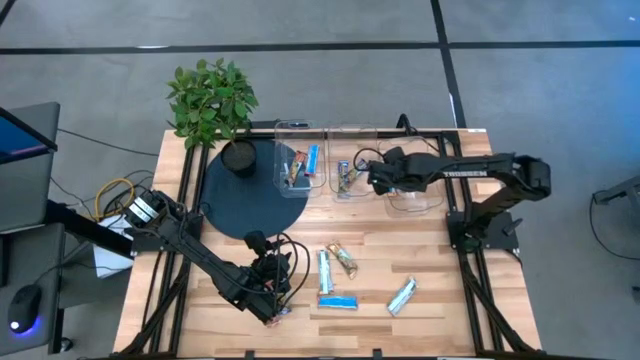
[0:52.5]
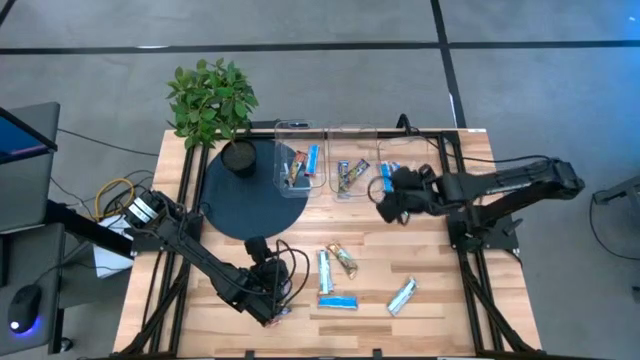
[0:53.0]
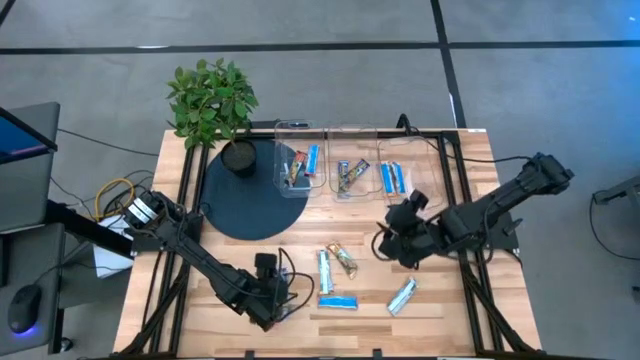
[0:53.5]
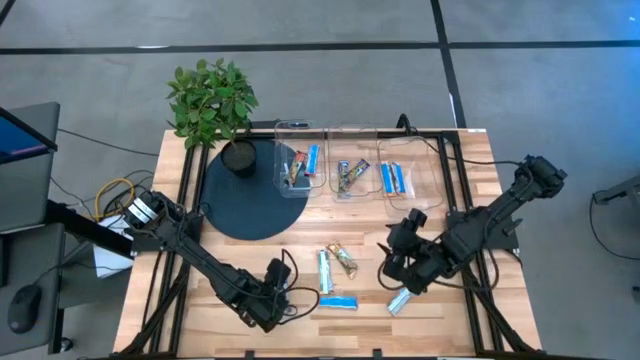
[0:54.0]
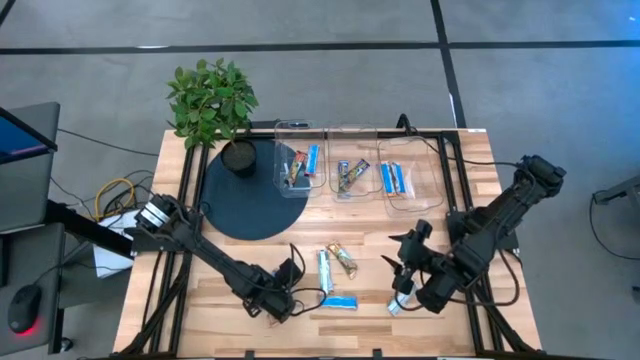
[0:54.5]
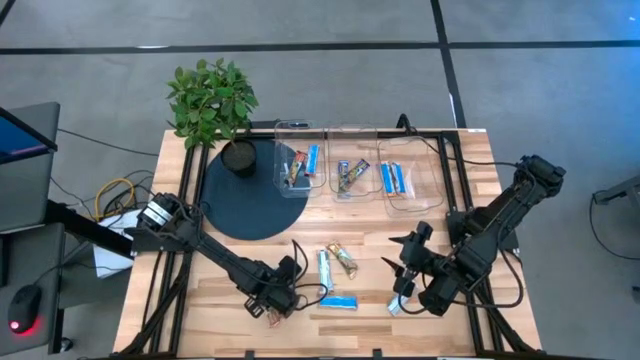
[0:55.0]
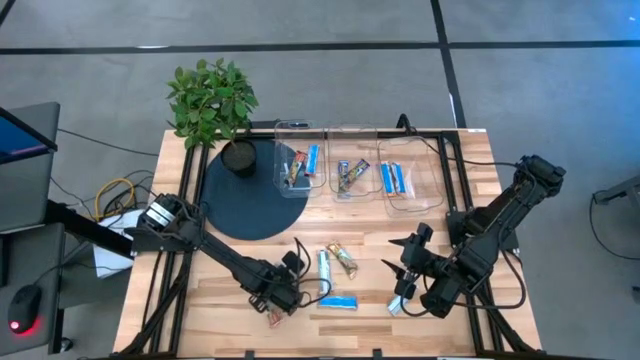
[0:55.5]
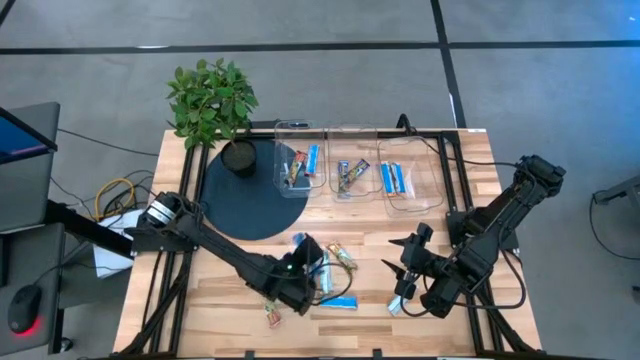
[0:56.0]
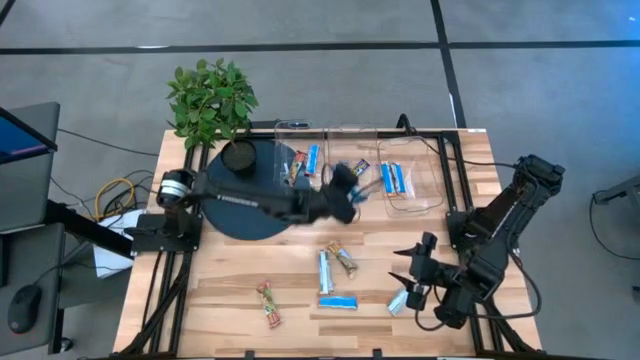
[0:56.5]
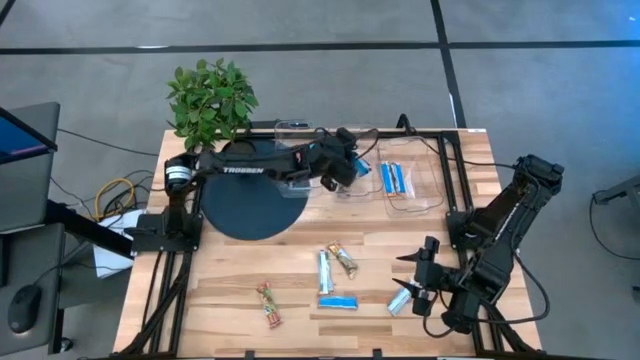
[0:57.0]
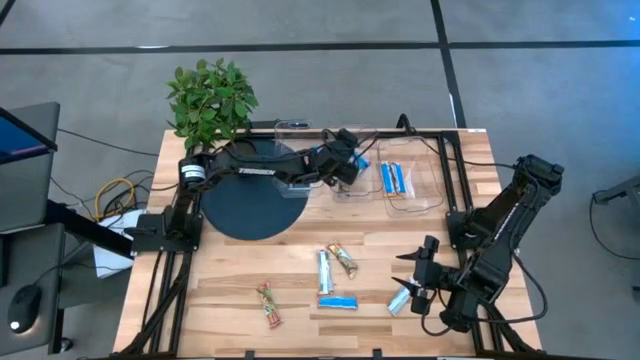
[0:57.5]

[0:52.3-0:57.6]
Task: Pick and place Granola Bars by type
Put the blue granola bar into the middle transparent bin

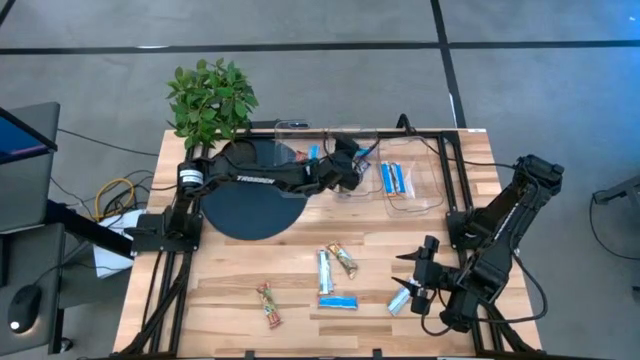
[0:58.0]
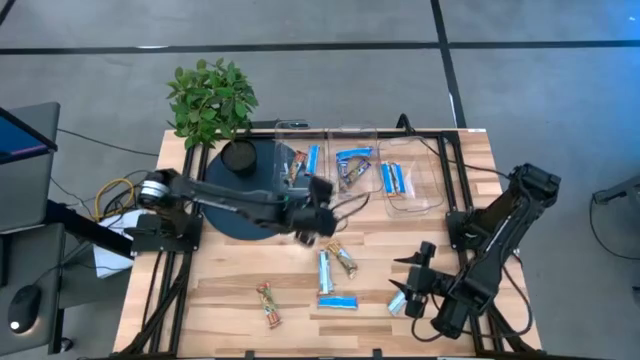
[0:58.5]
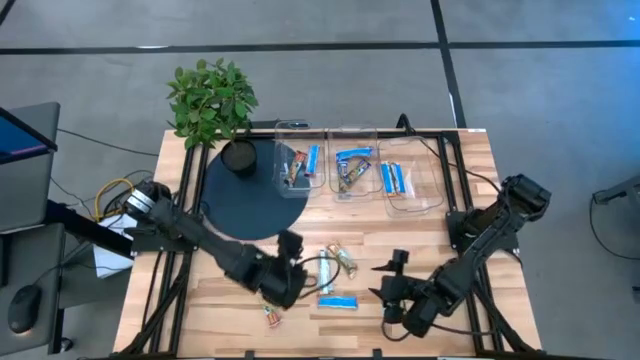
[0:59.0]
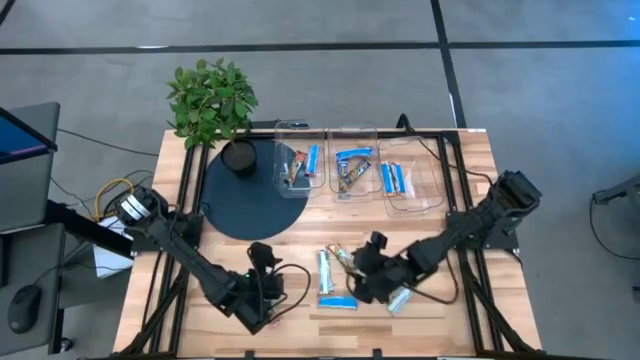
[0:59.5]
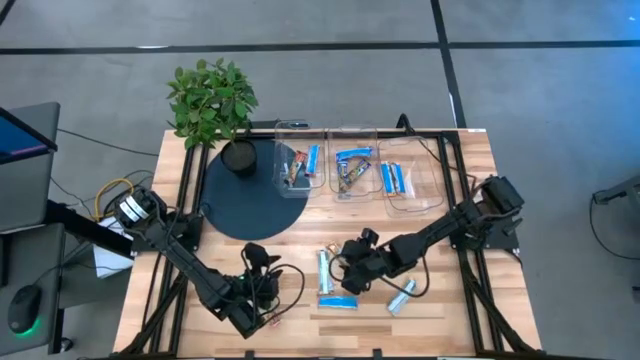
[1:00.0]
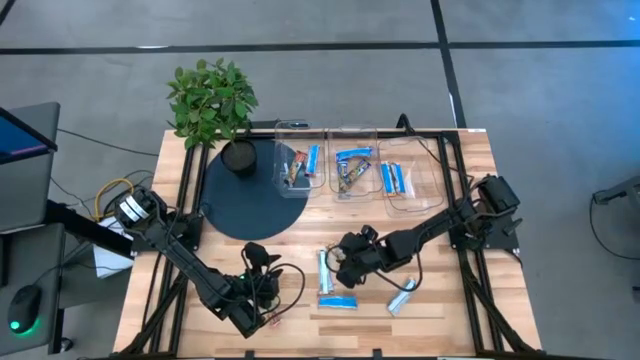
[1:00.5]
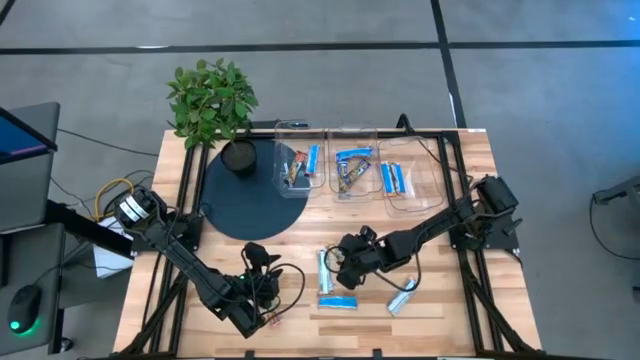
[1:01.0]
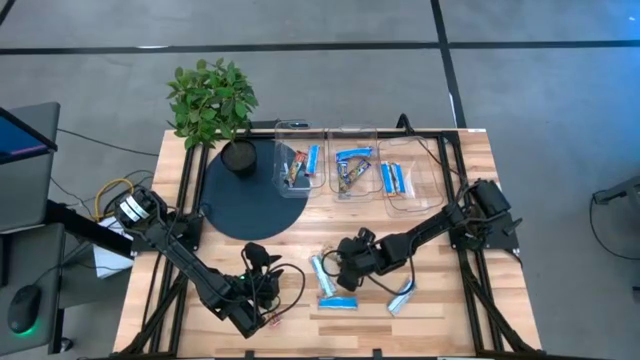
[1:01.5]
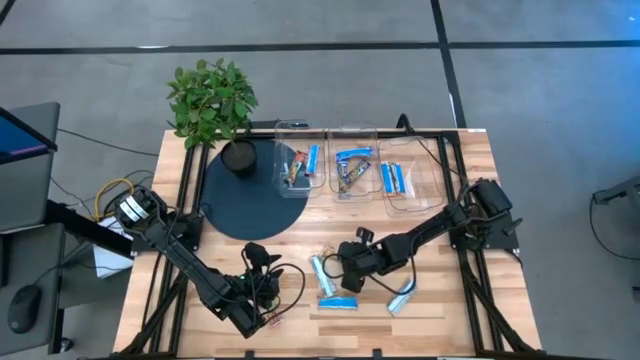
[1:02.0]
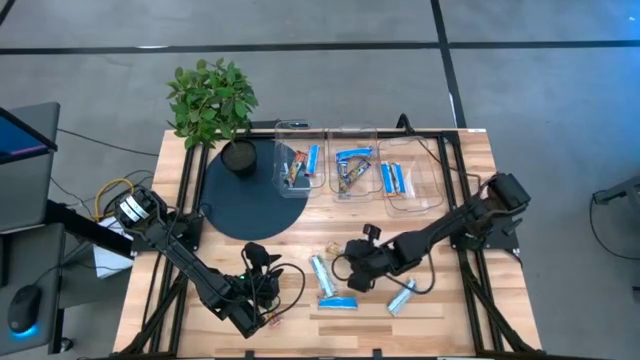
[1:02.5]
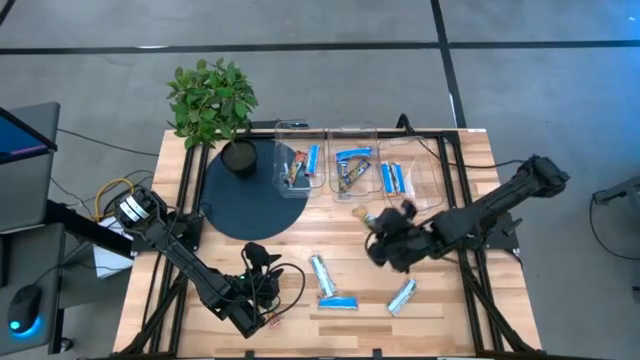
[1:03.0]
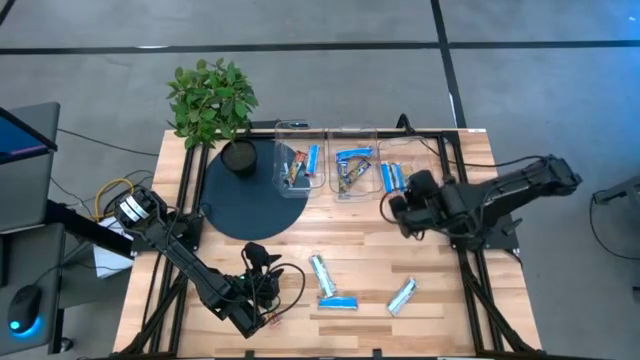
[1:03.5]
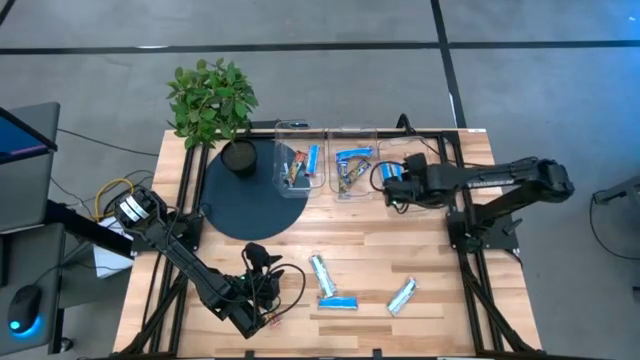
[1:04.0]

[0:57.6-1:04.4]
Put the yellow granola bar into the right transparent bin

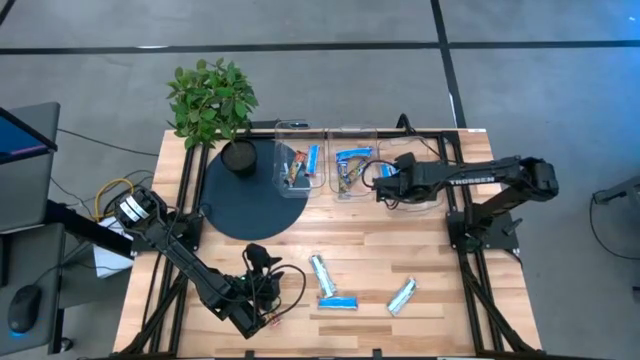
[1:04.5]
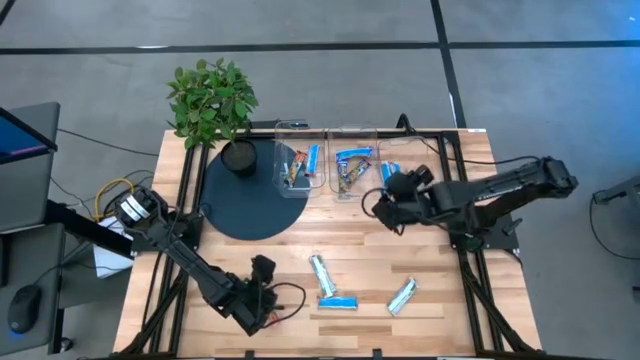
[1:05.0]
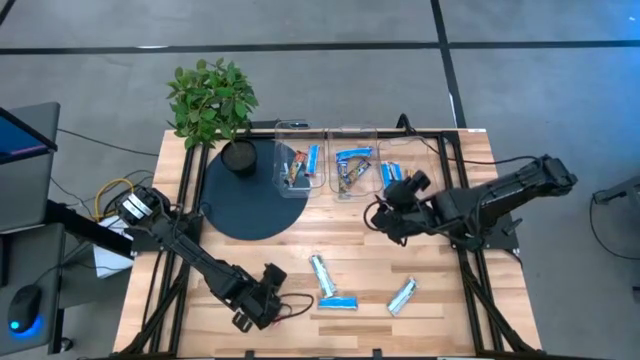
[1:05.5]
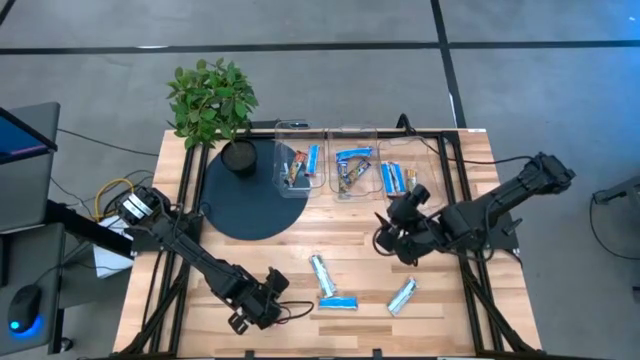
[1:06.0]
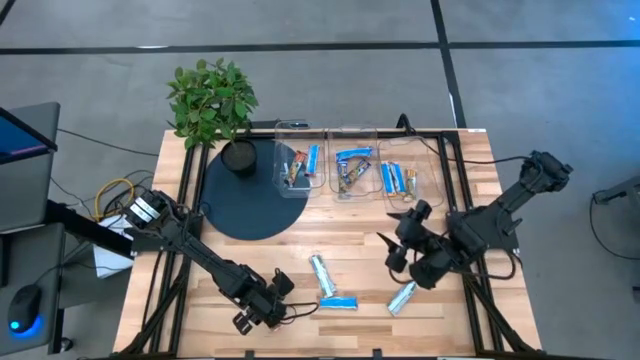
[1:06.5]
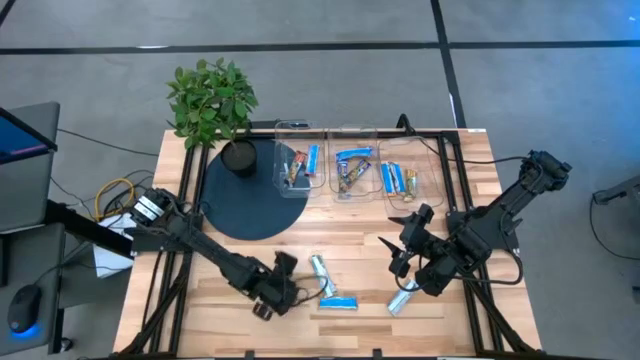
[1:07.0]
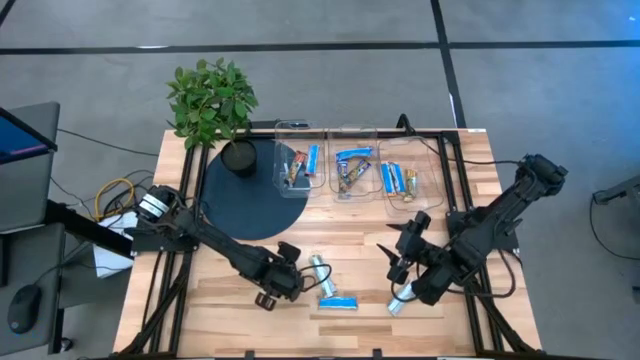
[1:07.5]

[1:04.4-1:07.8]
Put the red granola bar into the left transparent bin

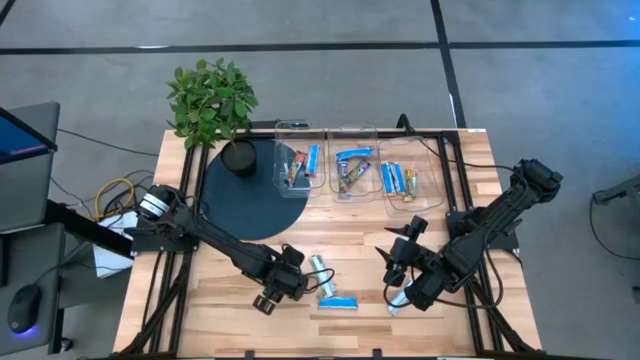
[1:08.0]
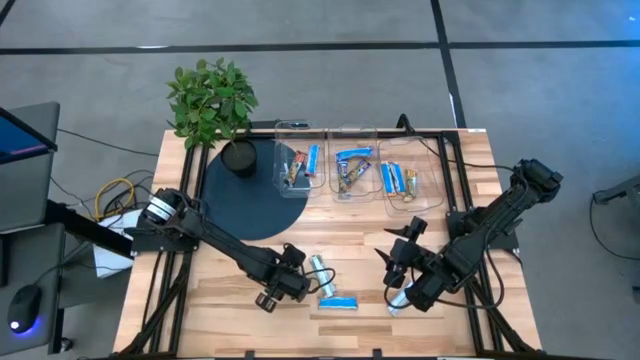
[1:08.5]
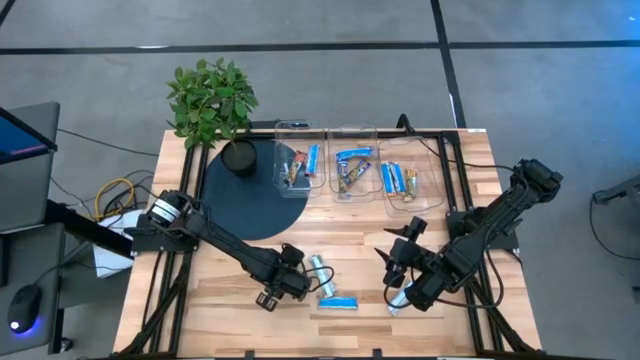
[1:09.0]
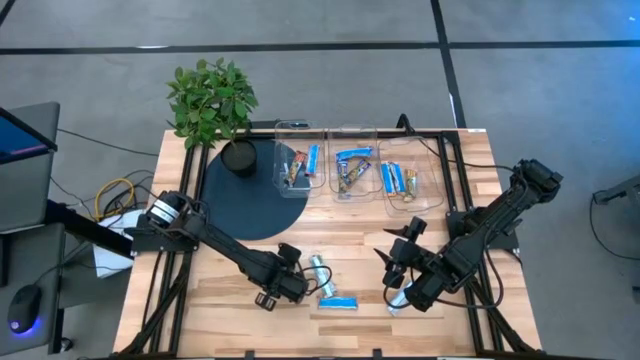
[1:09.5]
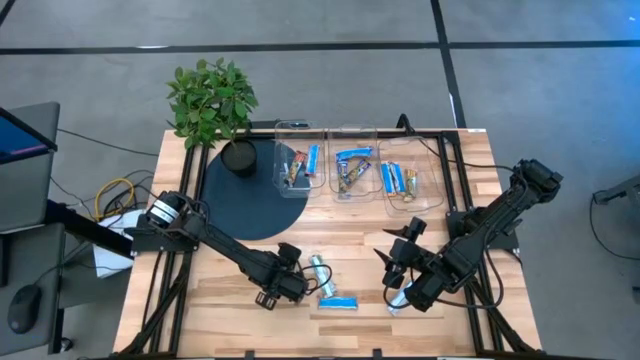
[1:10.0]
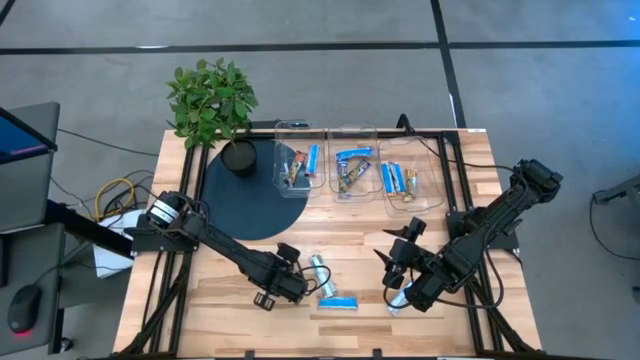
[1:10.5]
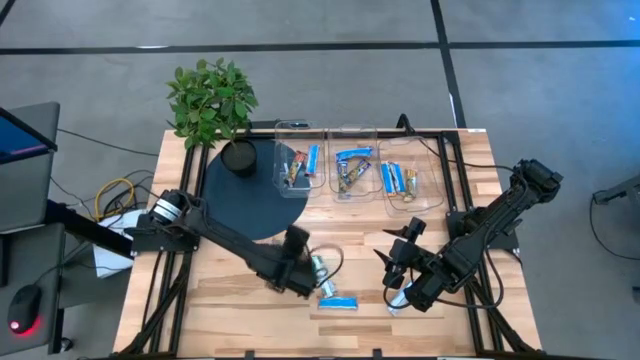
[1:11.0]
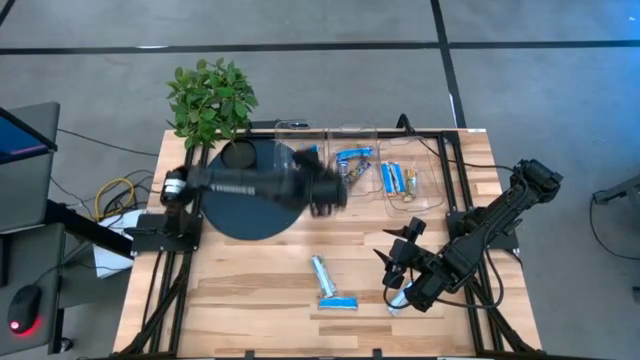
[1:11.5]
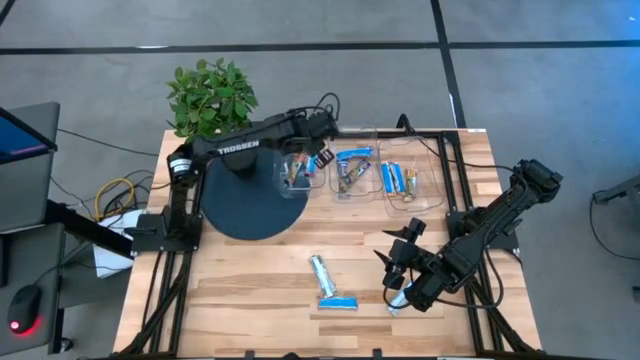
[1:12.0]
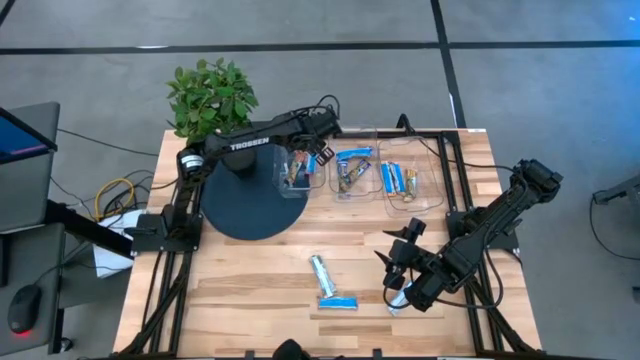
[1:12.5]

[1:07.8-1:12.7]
Put the red granola bar into the left transparent bin
